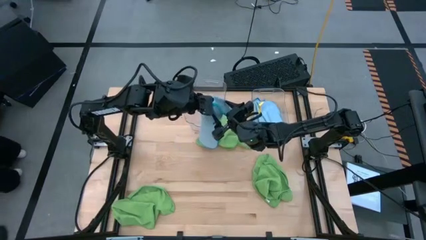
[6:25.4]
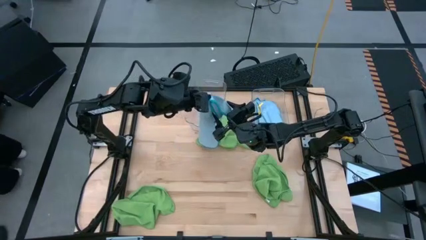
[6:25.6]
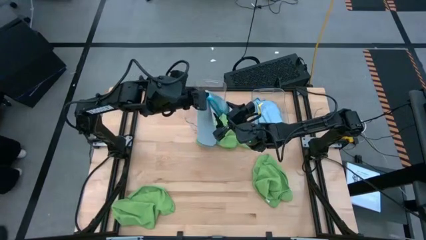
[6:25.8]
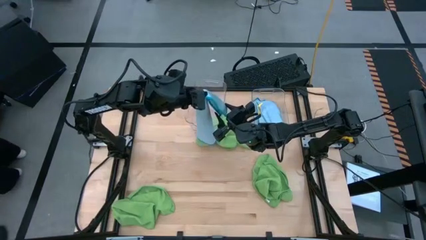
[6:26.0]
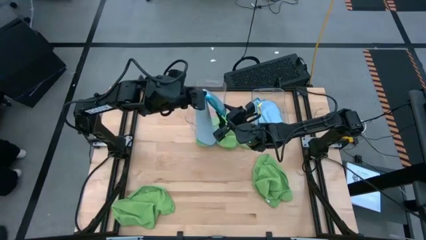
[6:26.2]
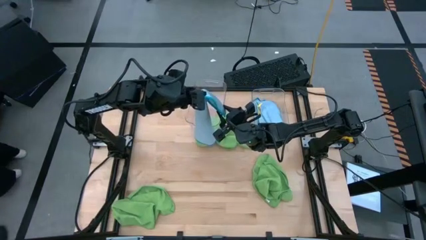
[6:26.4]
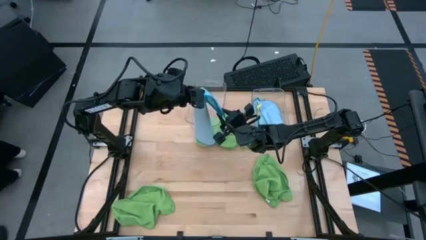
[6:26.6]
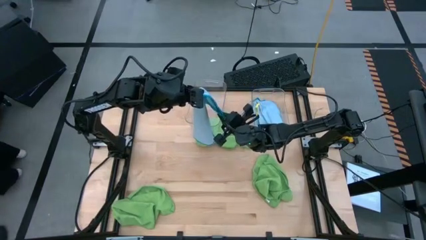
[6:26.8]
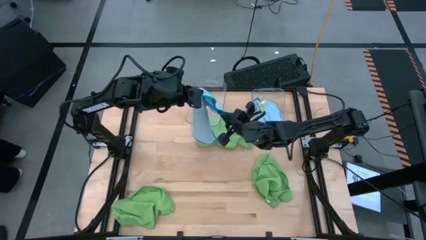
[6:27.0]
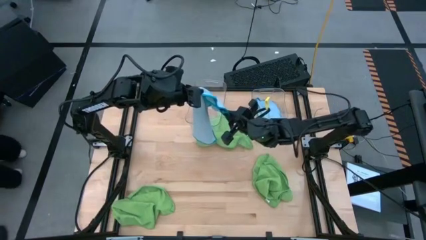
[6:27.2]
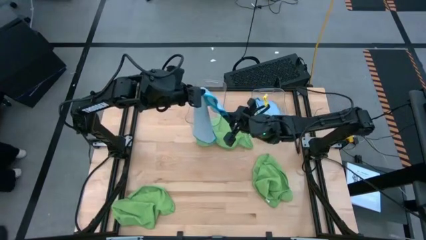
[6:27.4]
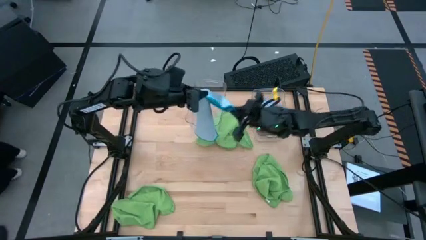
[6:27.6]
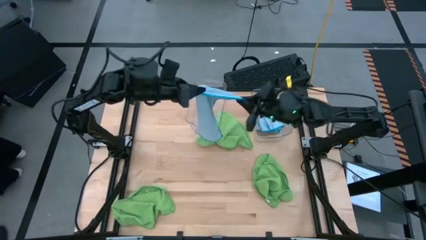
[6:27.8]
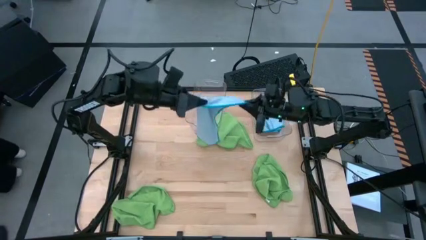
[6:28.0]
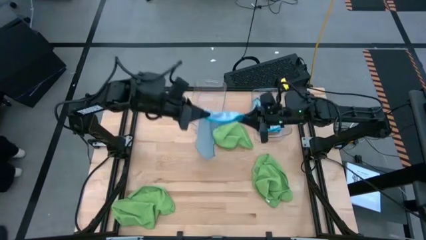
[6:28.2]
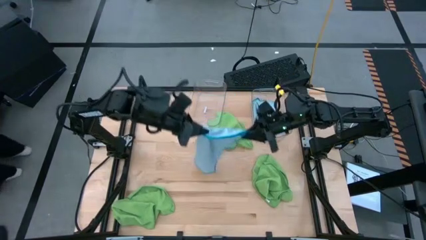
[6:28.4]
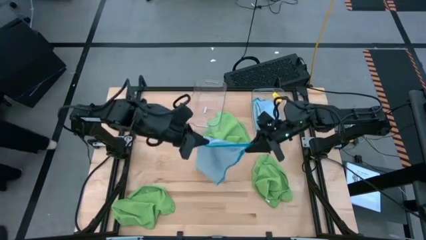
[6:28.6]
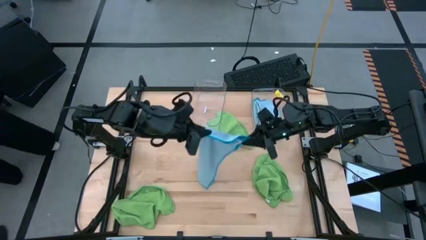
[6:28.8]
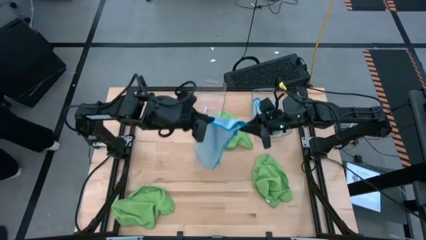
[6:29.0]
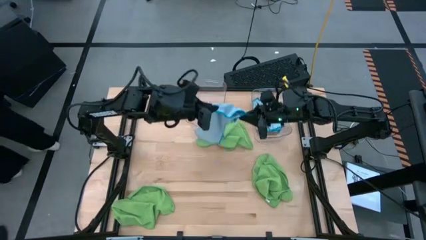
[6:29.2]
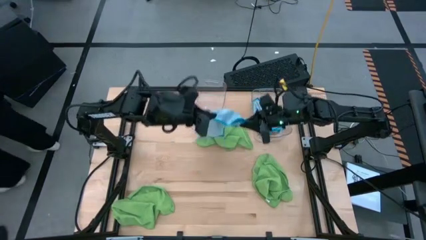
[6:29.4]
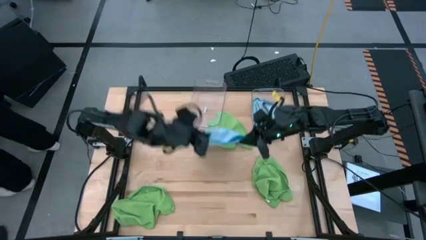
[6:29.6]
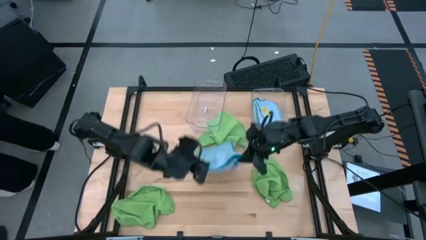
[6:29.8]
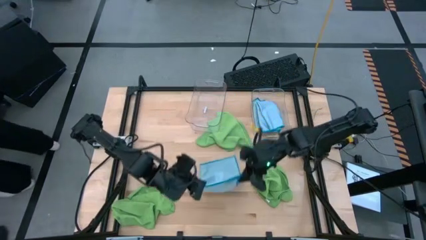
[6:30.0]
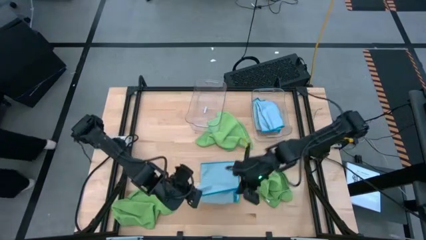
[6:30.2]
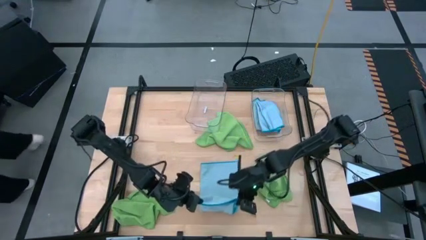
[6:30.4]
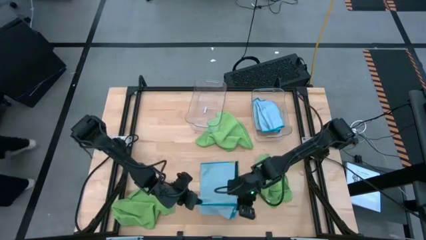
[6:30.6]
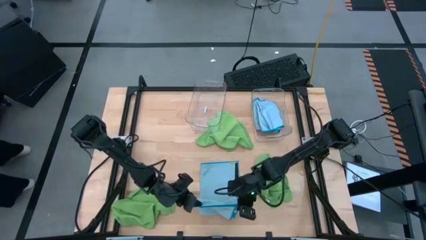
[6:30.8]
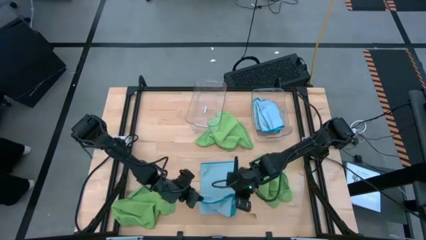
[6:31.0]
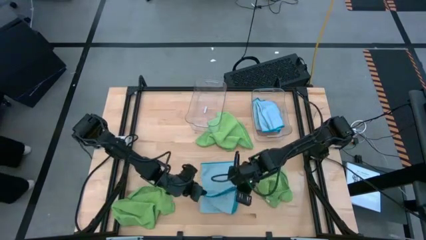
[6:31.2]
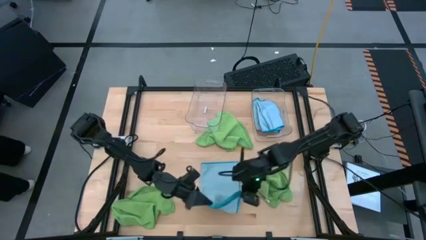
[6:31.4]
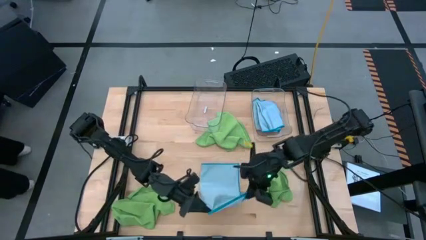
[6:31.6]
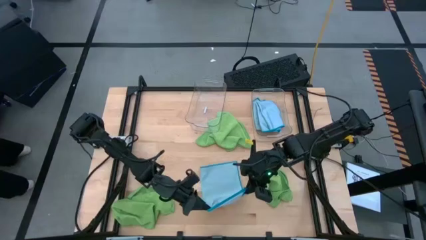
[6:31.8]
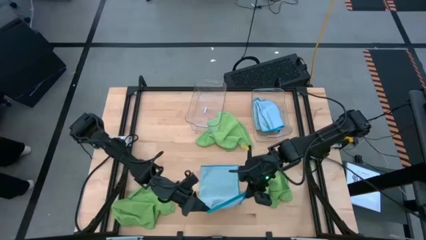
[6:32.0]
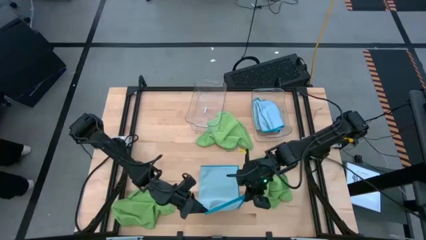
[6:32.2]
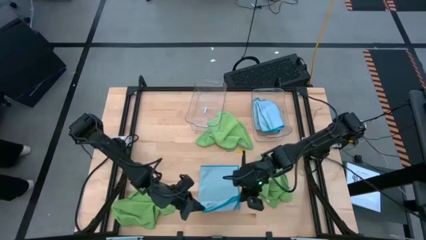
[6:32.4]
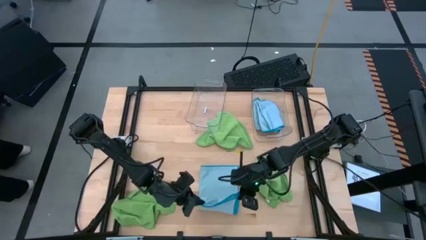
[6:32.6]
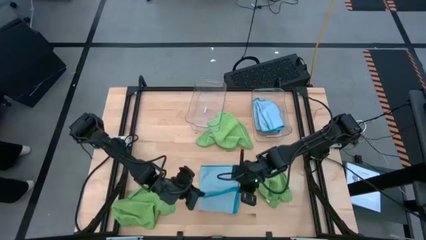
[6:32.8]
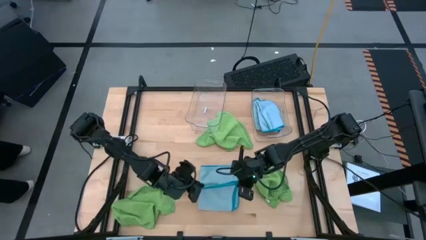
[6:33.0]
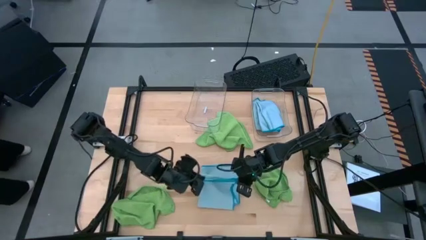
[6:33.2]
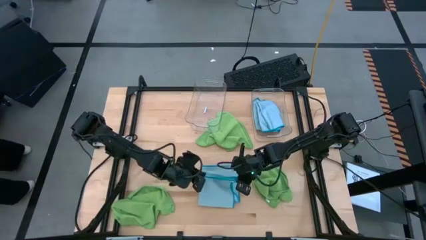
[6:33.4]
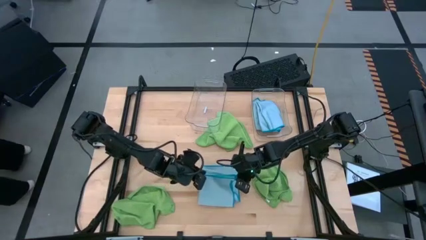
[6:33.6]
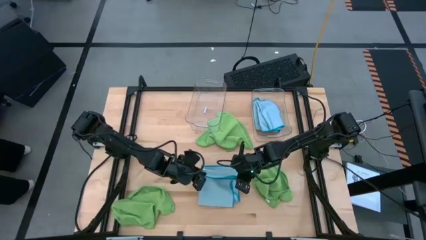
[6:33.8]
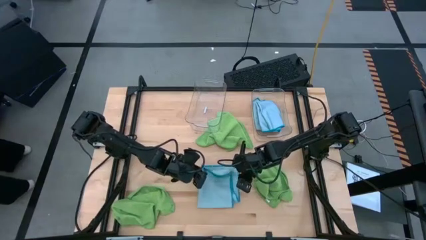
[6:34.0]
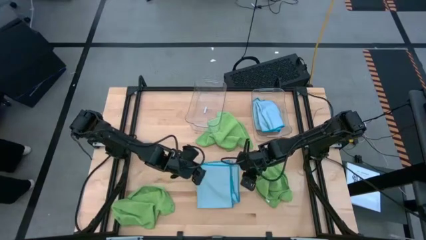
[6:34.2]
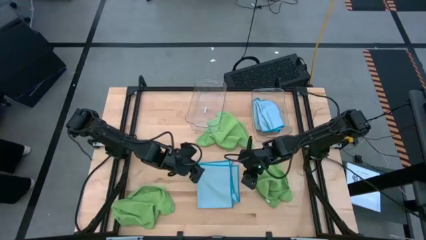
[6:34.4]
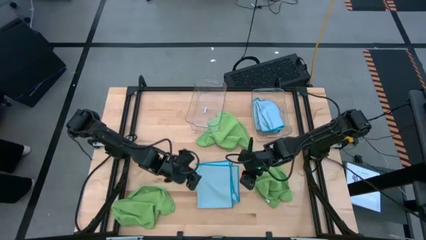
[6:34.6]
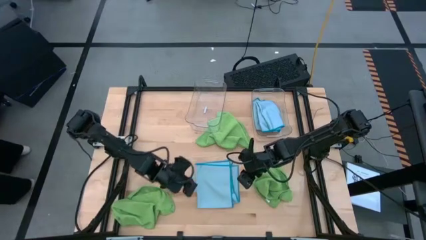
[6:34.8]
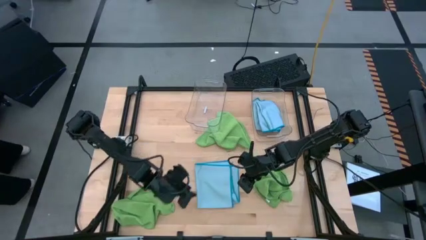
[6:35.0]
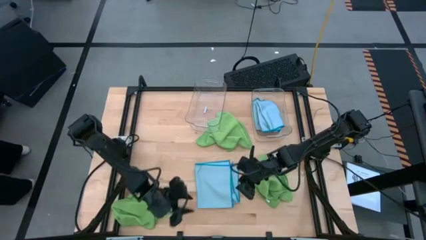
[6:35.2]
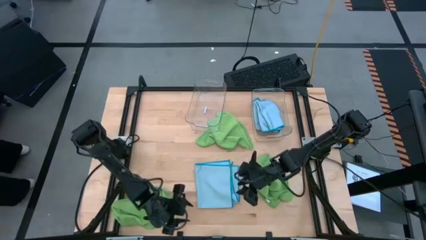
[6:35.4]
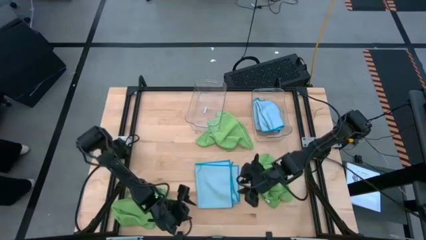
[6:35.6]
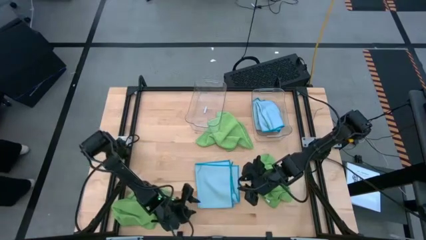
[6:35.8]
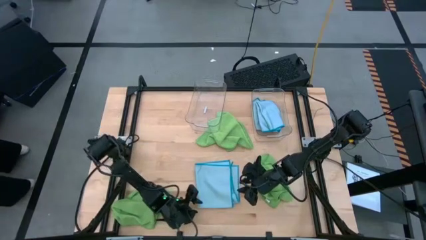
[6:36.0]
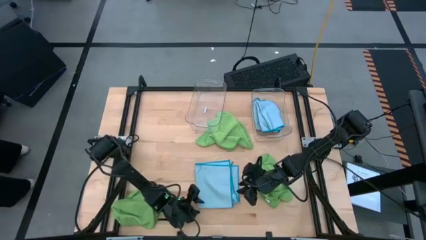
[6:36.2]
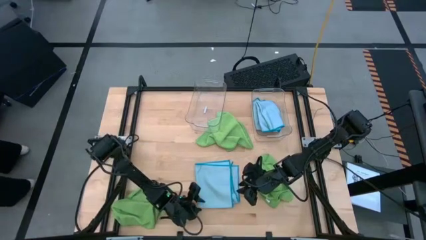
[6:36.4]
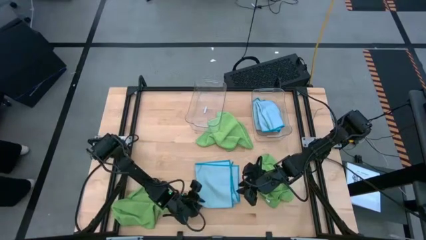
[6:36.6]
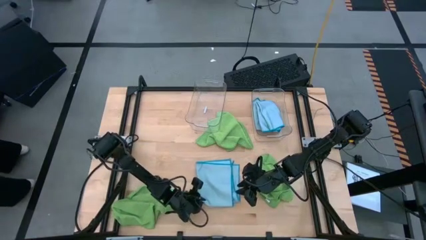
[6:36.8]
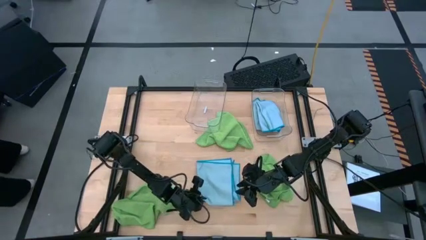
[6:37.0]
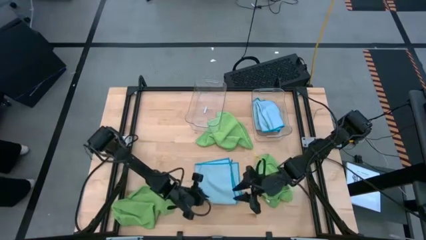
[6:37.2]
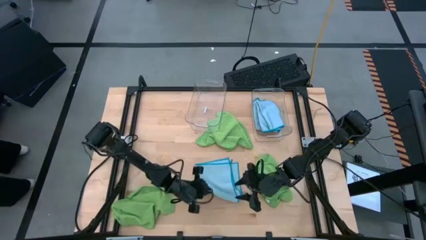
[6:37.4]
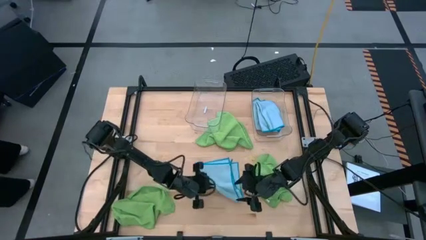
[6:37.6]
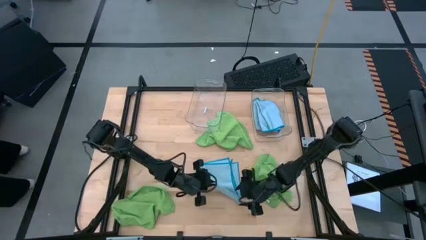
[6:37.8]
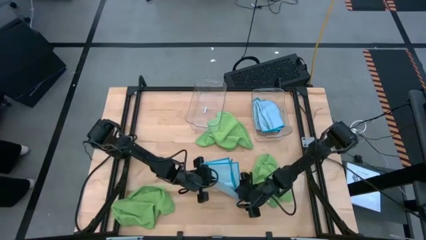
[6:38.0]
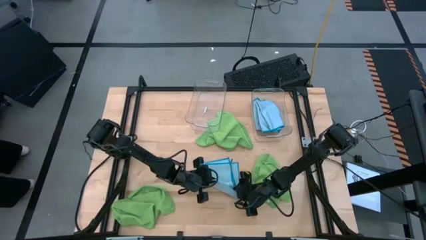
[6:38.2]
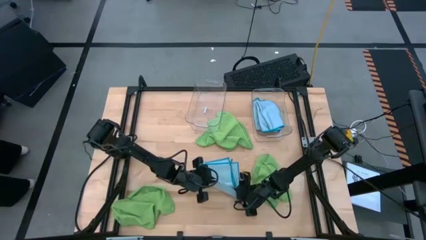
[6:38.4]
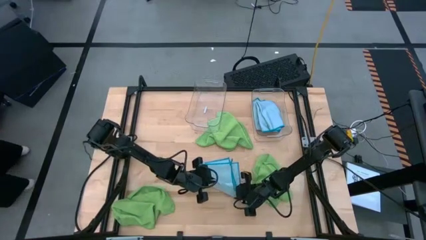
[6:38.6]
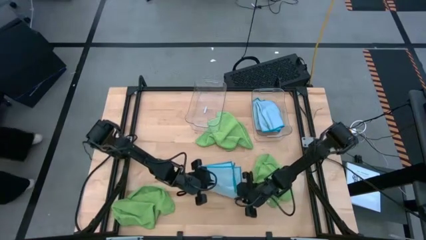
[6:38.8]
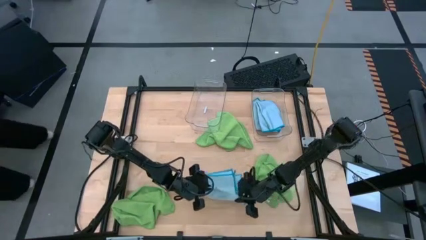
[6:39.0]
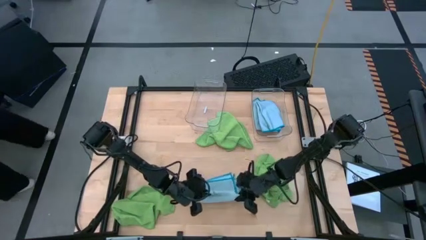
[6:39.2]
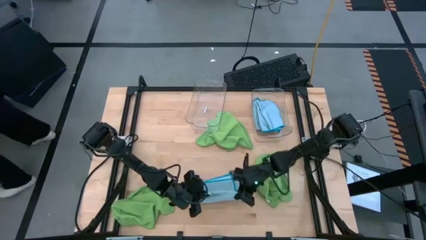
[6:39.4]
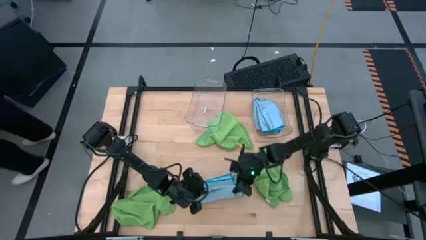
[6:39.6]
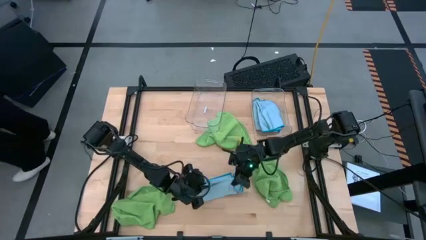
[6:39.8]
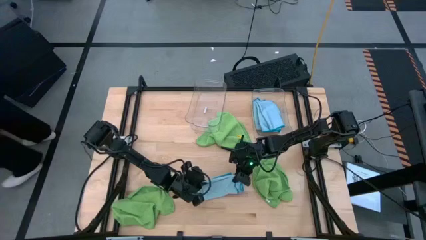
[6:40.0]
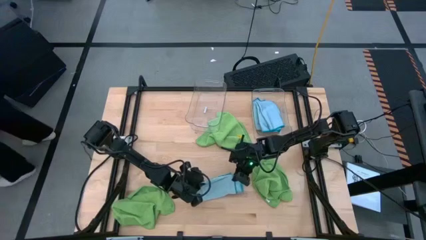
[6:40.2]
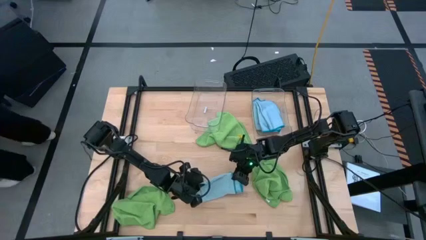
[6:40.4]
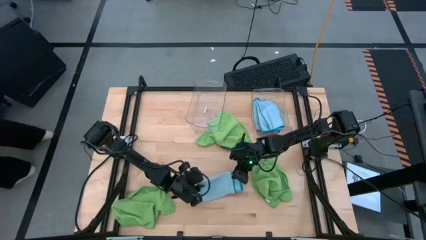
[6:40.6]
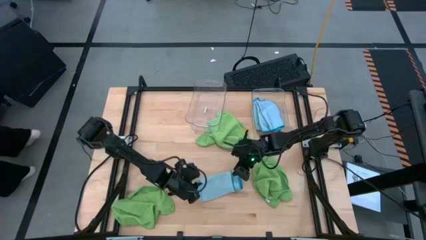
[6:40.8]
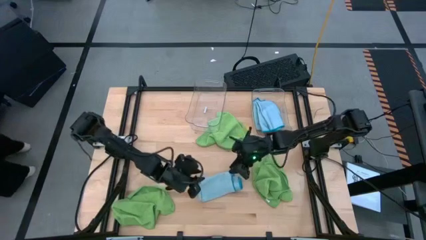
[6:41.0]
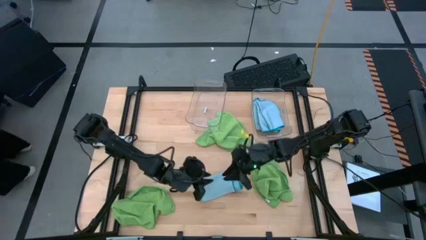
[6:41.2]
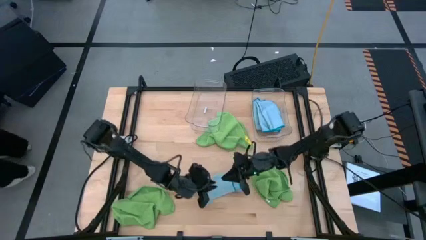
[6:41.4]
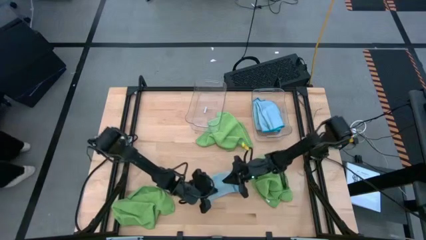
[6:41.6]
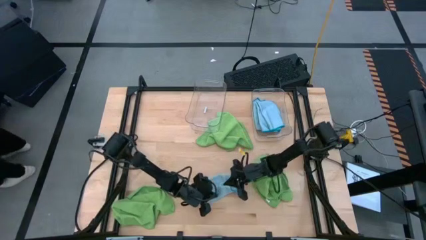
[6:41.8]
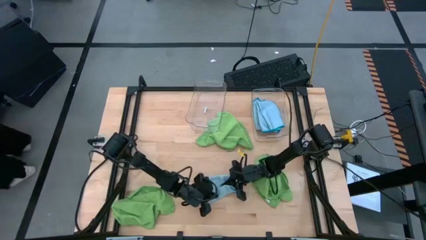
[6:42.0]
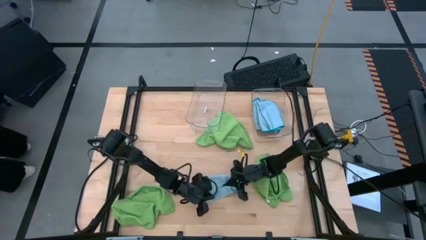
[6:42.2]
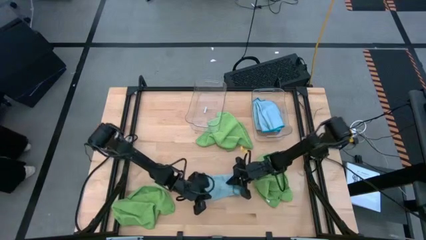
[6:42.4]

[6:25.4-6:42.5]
Task: Fold microfiber towels
Fold the blue microfiber towel
